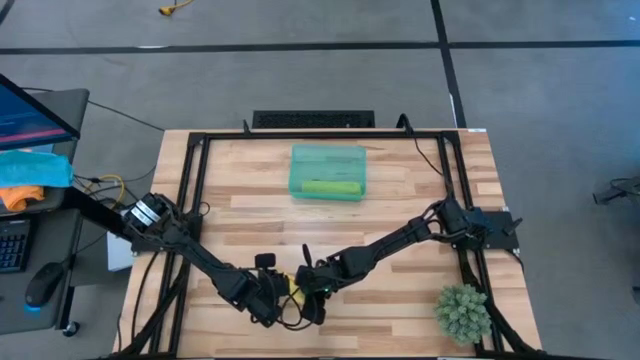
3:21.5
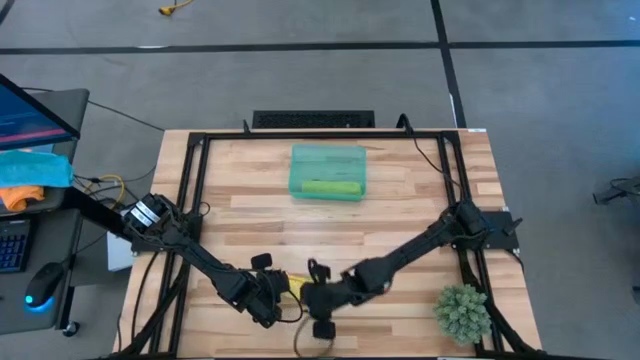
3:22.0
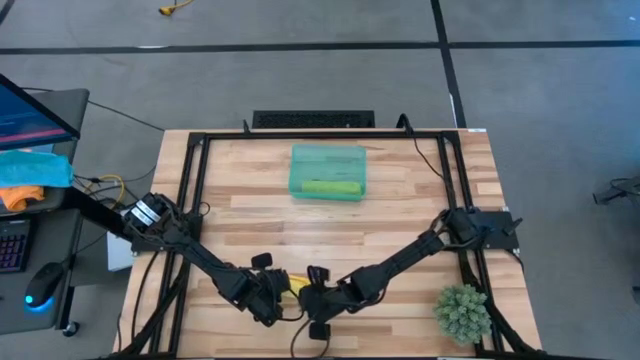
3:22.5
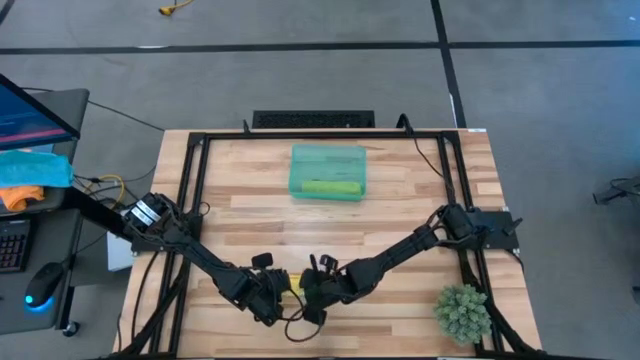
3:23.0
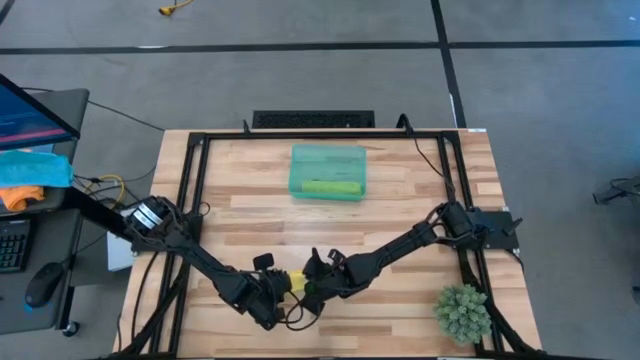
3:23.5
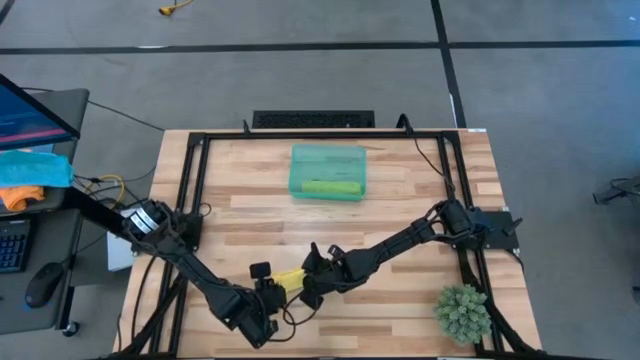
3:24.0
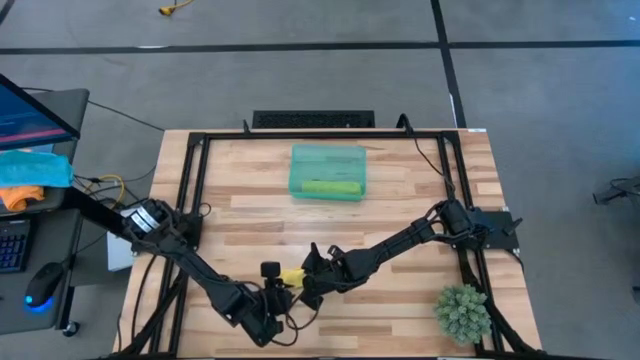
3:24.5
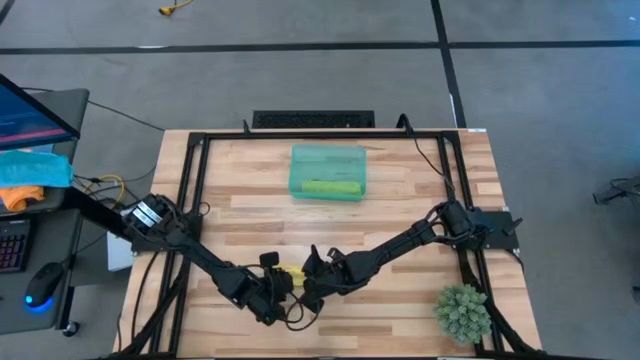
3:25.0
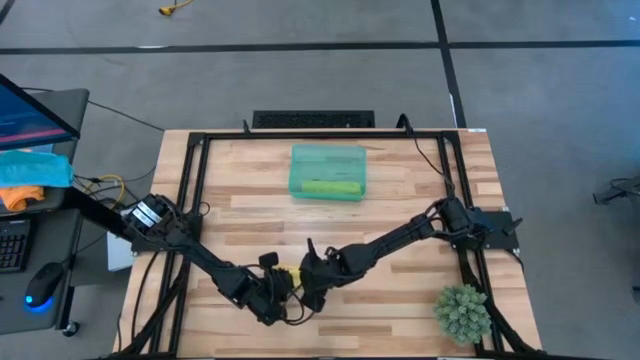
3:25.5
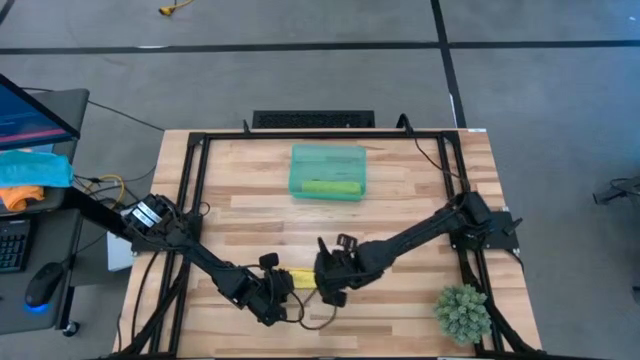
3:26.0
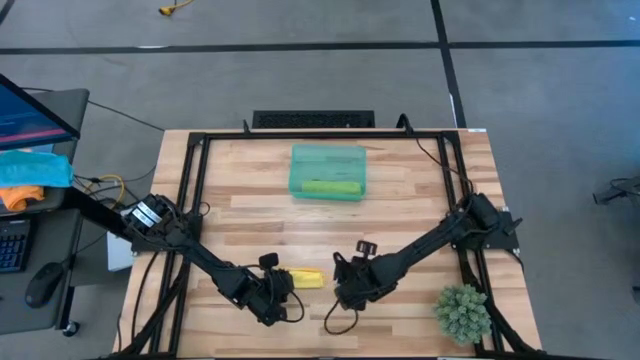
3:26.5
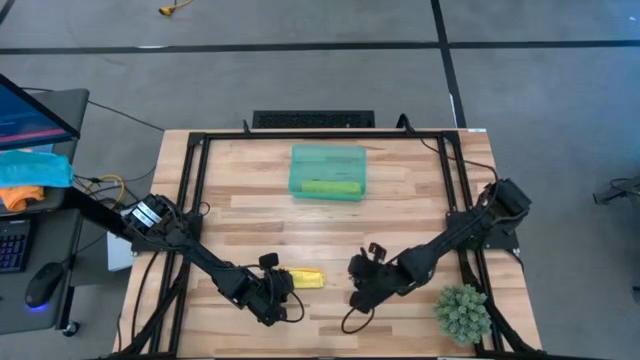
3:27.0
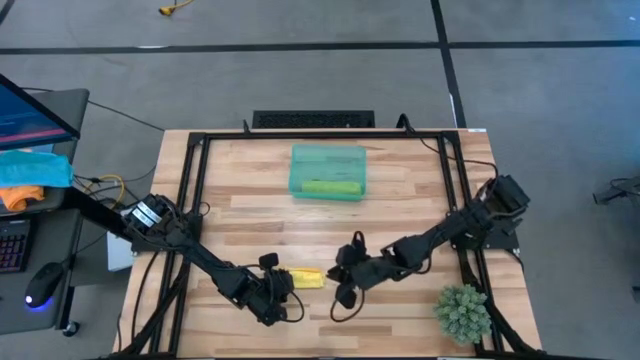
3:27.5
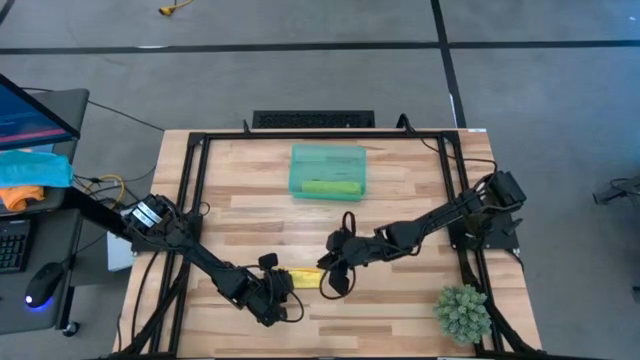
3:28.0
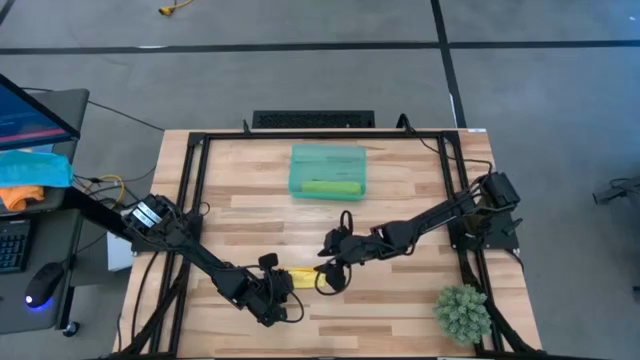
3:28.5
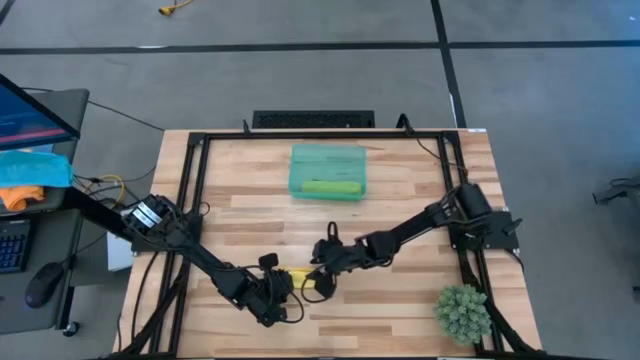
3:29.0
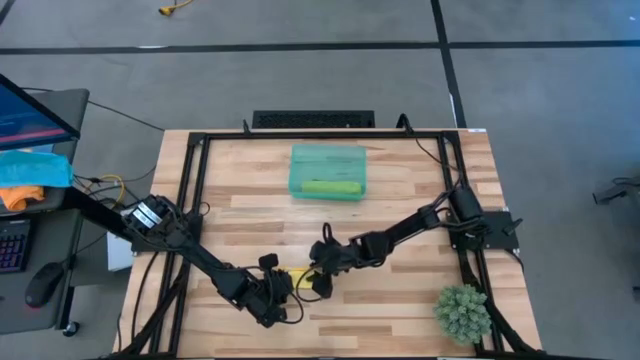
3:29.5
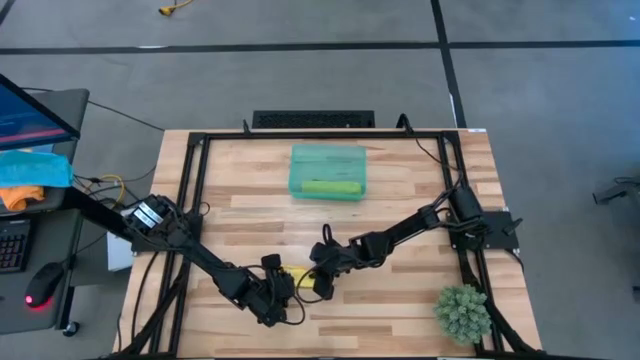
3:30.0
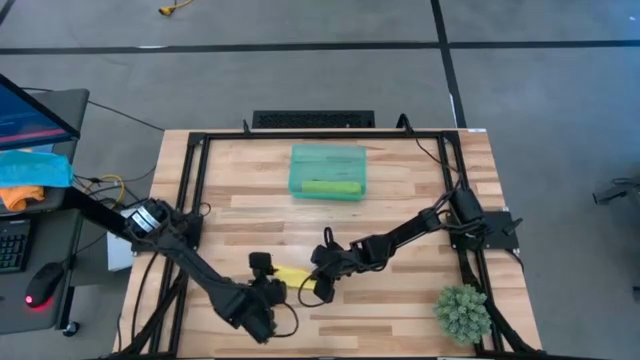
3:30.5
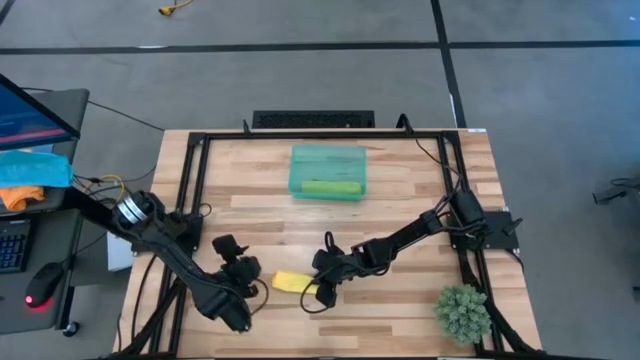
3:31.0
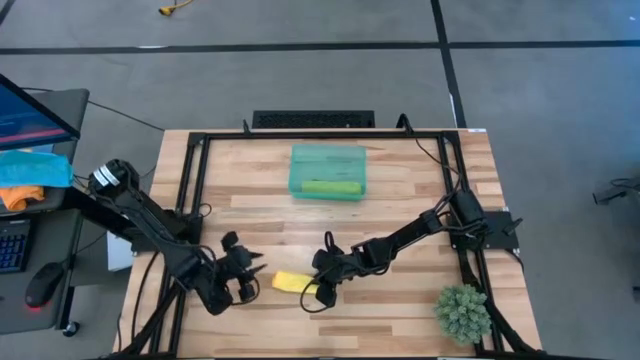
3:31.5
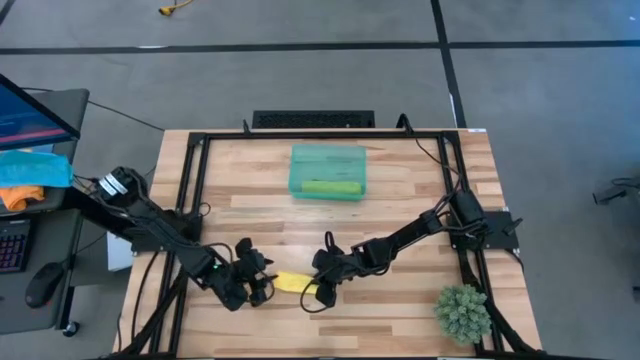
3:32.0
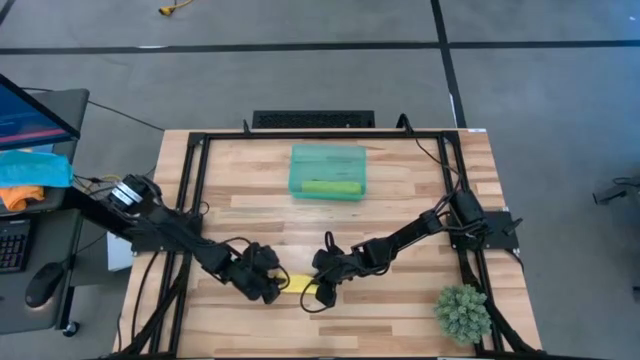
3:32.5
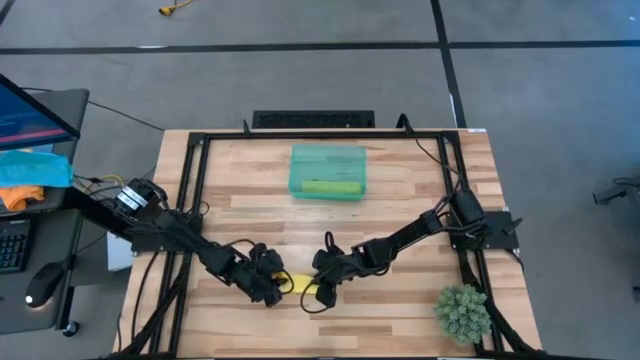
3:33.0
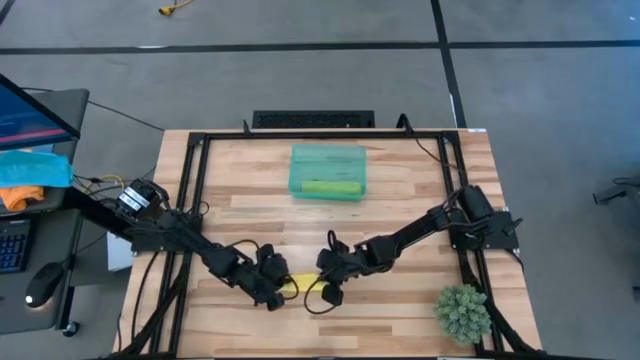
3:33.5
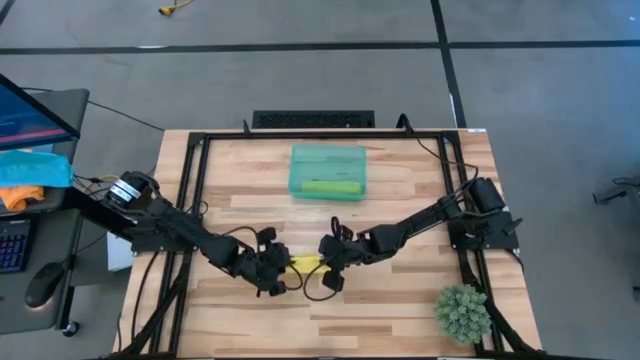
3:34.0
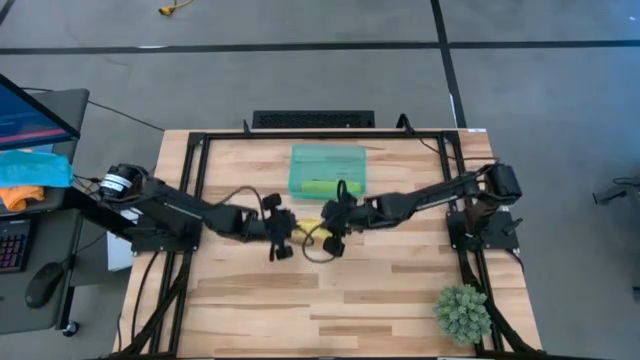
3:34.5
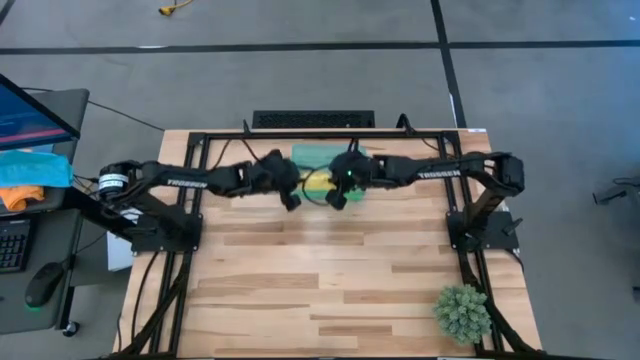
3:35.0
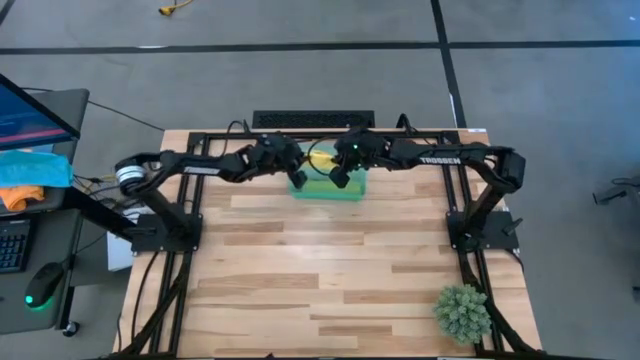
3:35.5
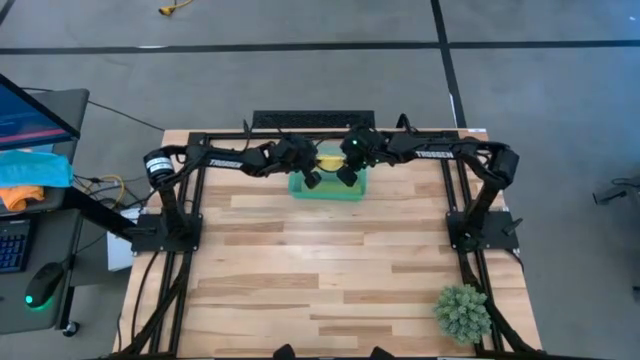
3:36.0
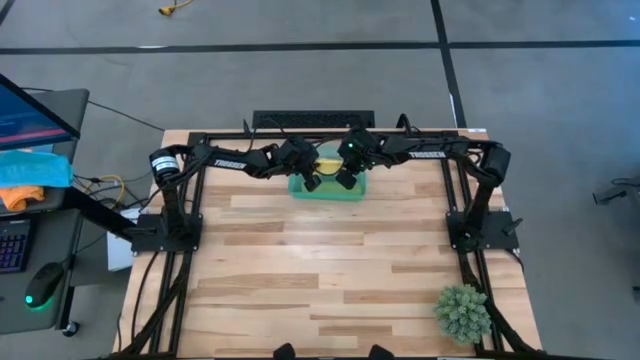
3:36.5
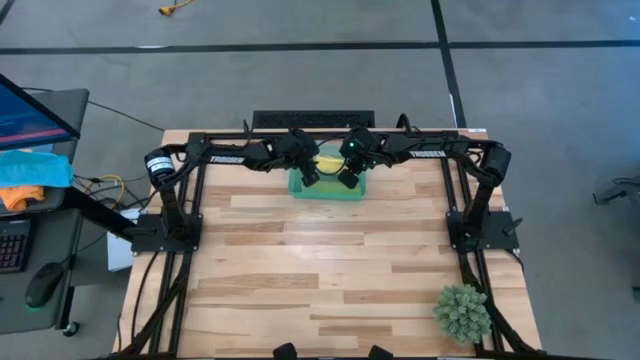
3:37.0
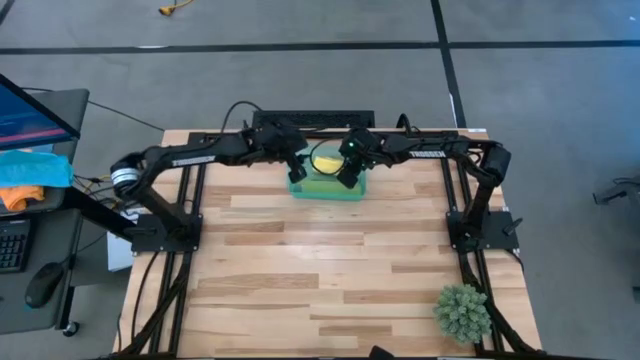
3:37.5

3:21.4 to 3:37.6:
Task: Roll microfiber towels into tight, uniform cylinder then place into a basket
Put the rolled yellow microfiber towel into the green bin

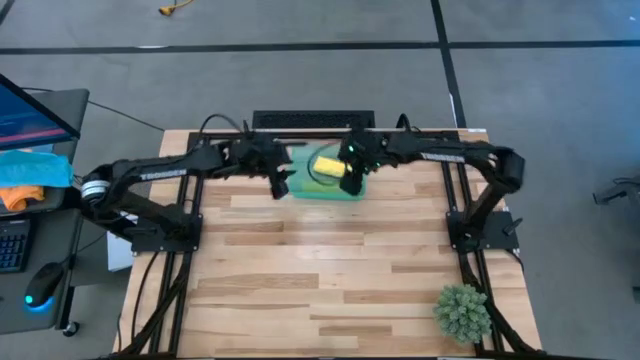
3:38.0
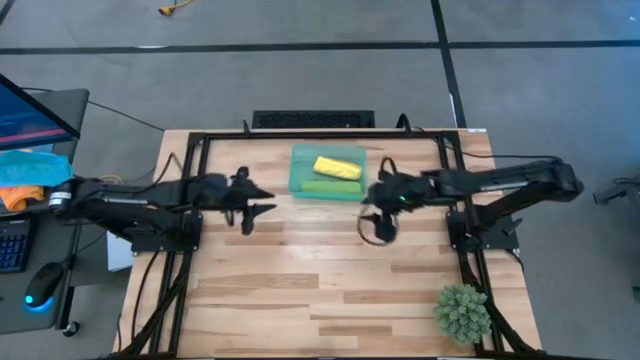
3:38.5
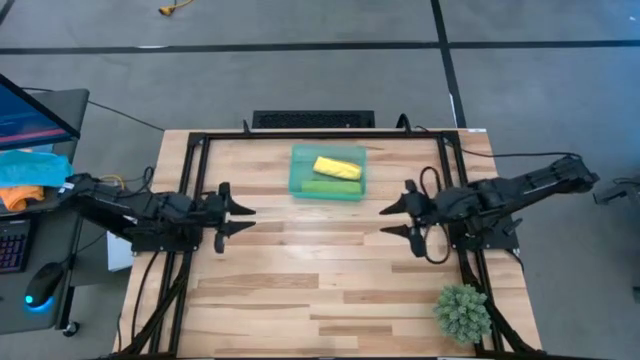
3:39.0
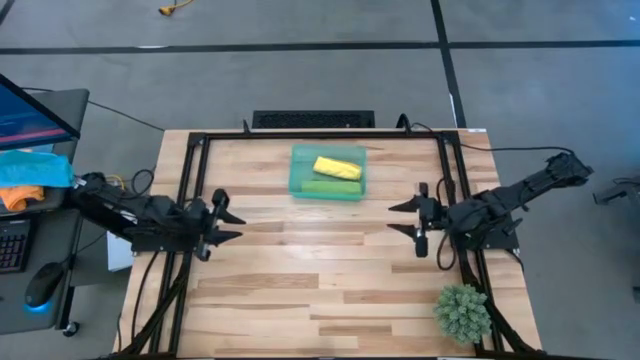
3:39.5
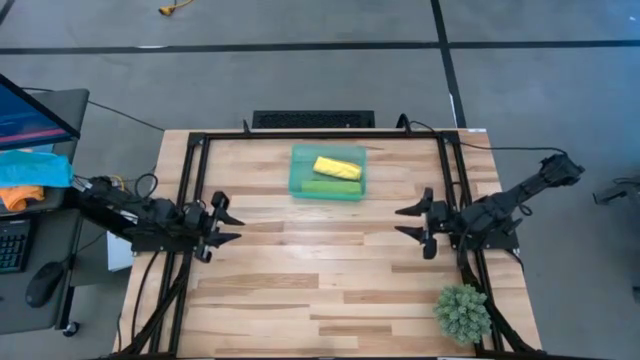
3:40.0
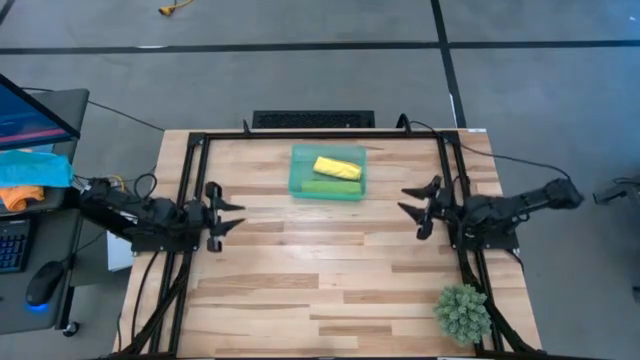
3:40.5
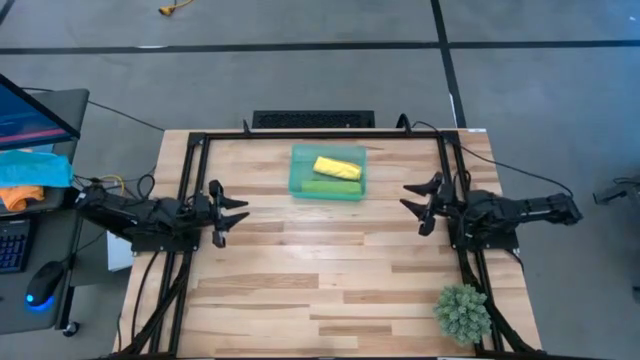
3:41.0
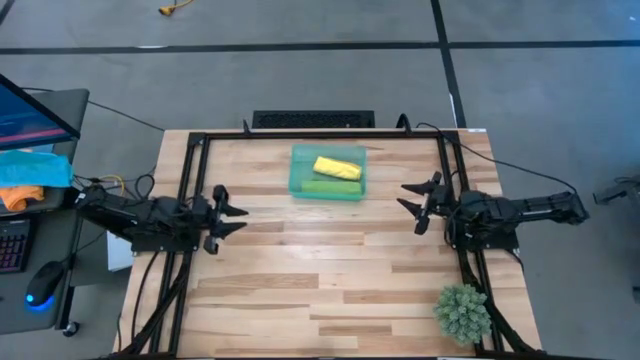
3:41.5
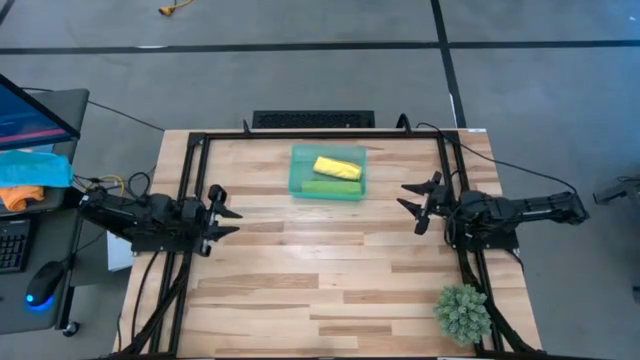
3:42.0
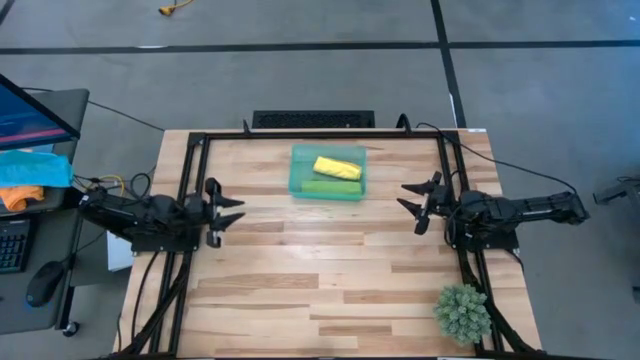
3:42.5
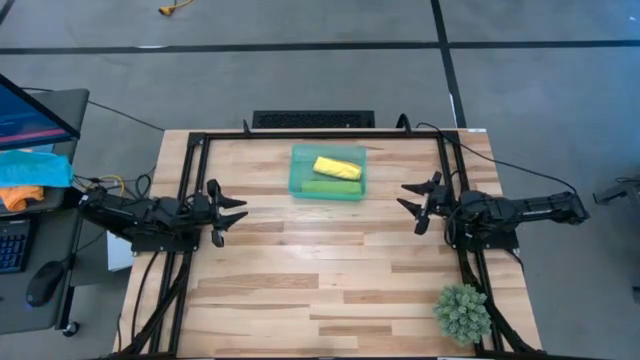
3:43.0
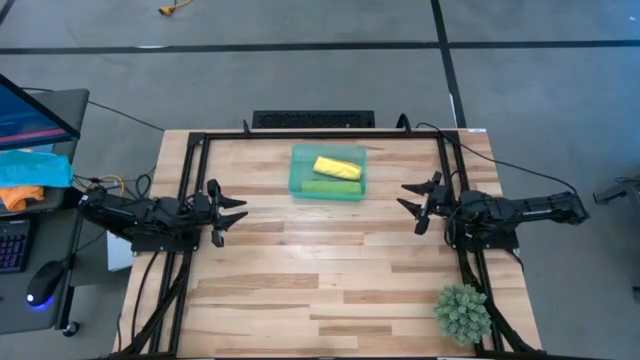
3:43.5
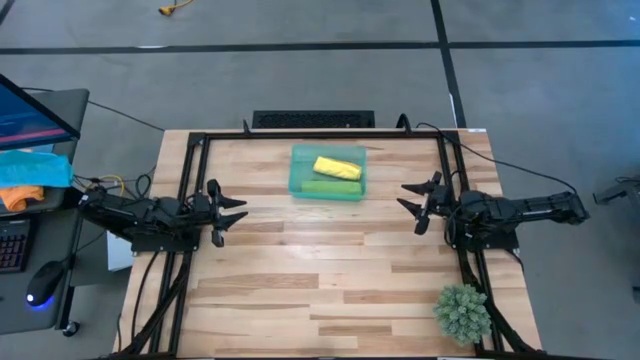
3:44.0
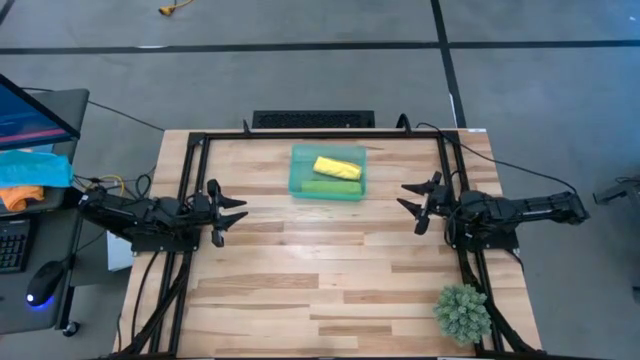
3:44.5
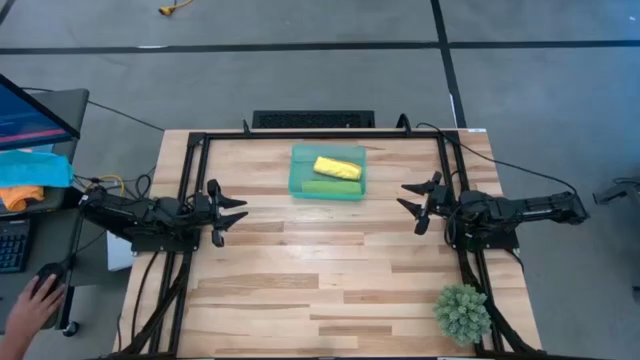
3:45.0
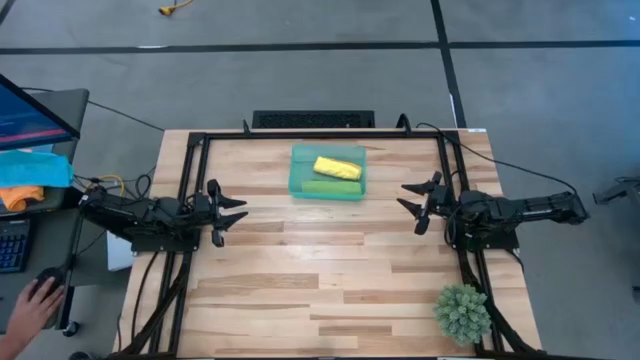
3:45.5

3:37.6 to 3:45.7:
Return to Home Position
